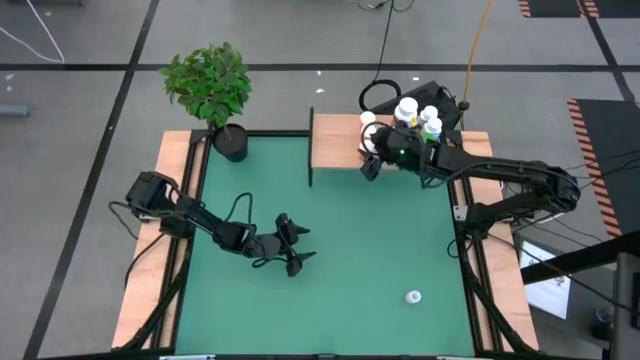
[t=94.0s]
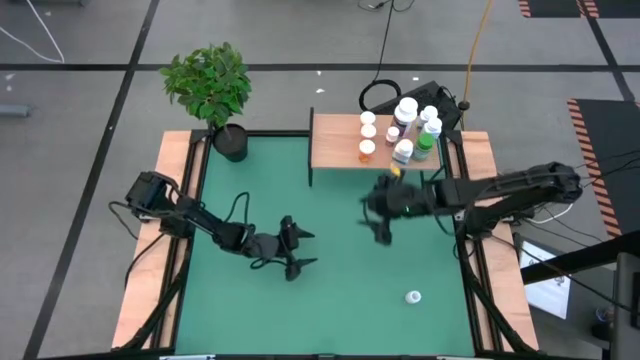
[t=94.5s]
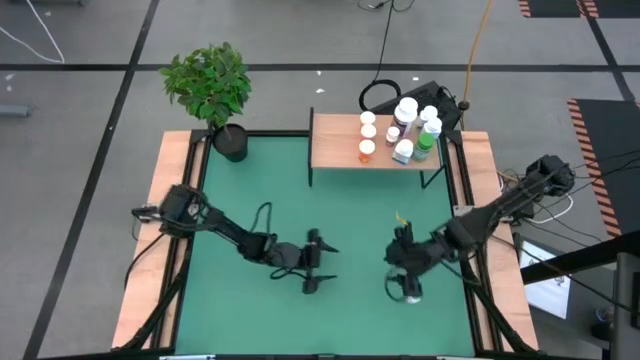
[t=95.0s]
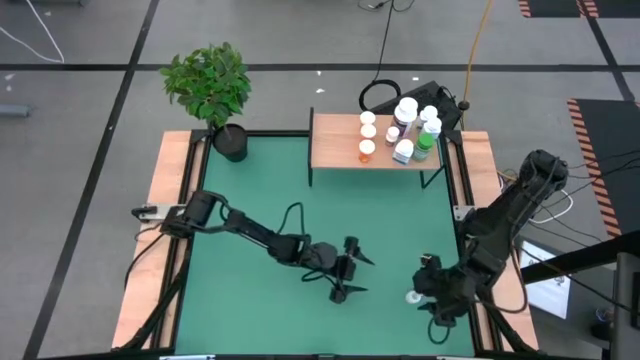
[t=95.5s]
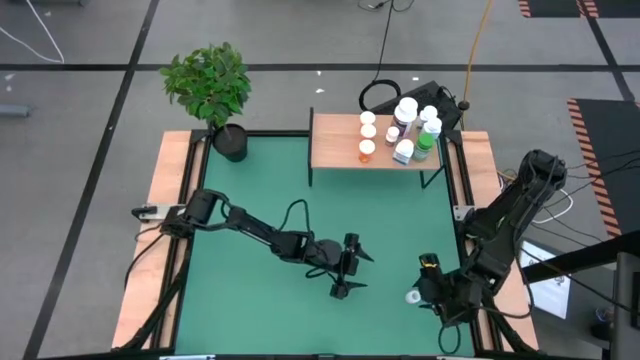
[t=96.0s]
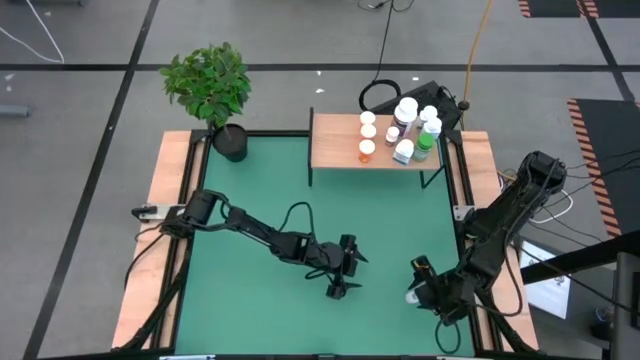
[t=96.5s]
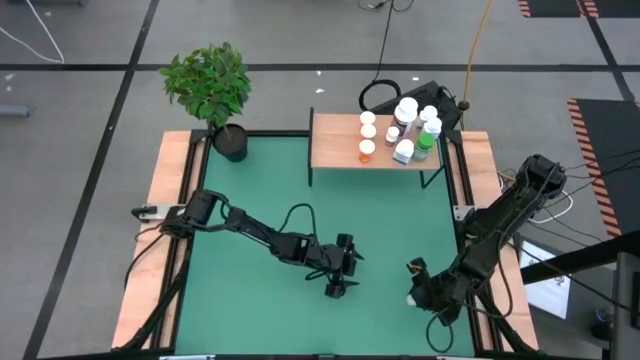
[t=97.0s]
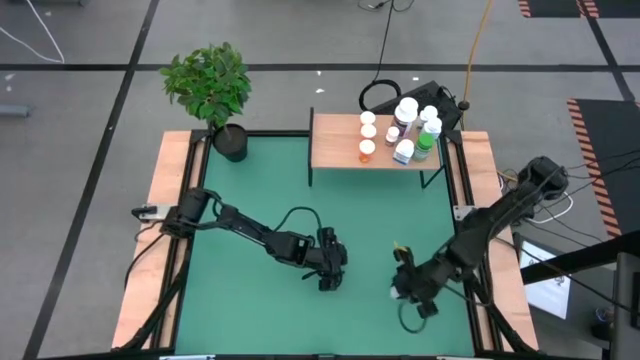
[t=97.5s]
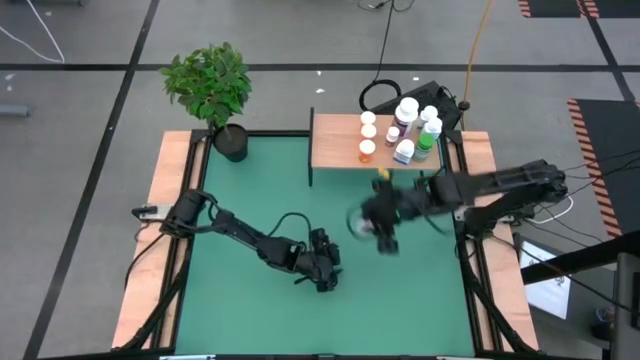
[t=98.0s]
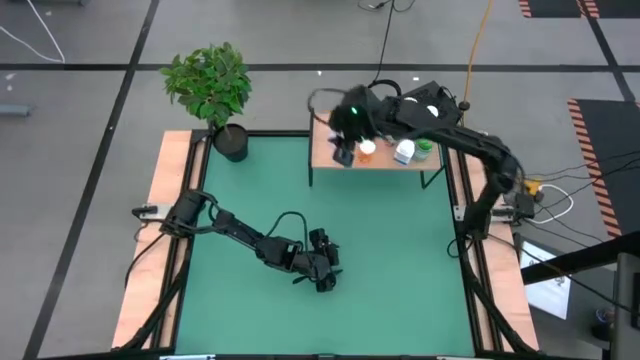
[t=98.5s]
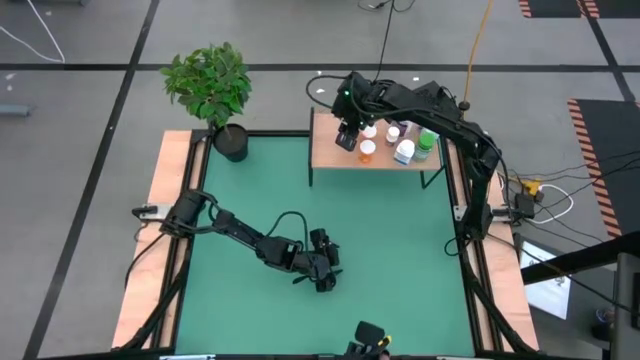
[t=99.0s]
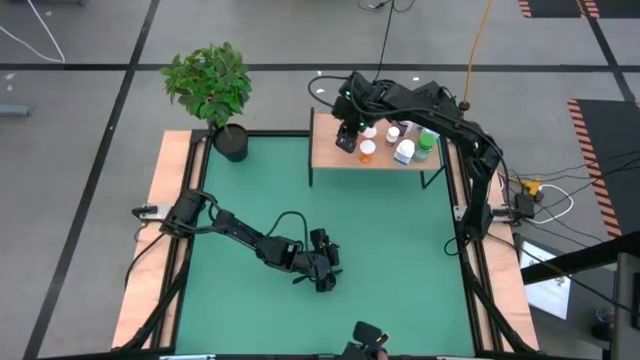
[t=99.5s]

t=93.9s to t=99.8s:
Task: Pick and place medicine bottles onto shelf by color
Put the white pill bottle on the shelf

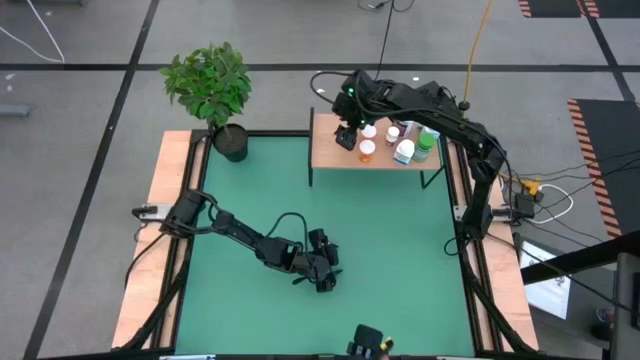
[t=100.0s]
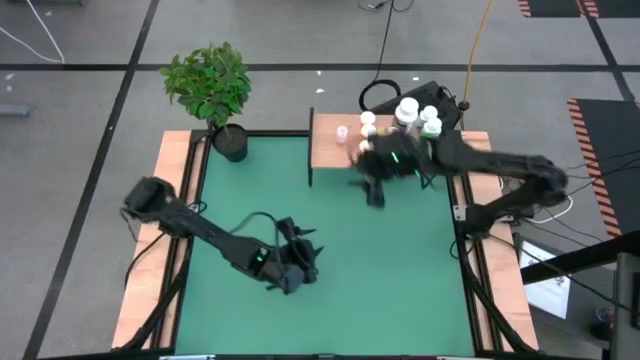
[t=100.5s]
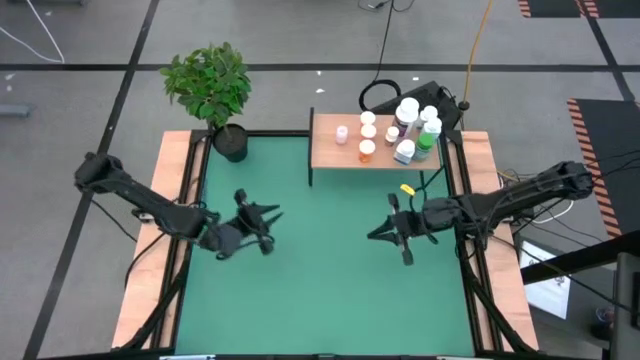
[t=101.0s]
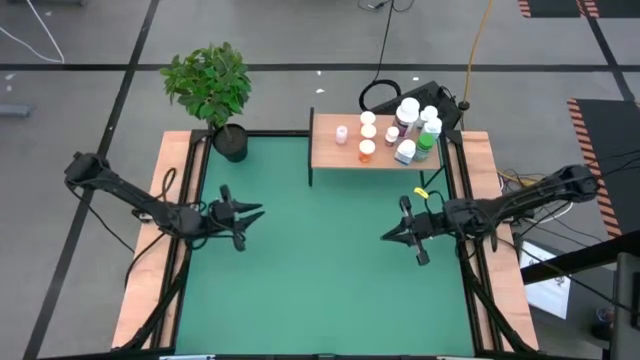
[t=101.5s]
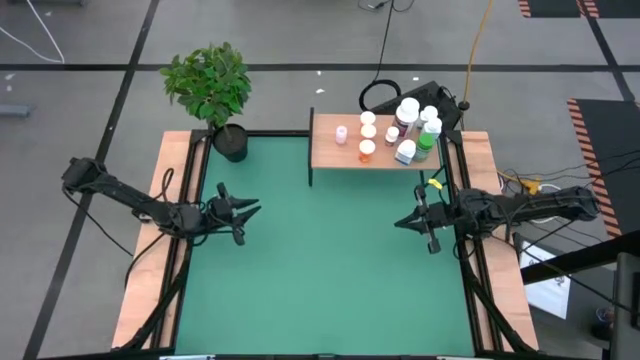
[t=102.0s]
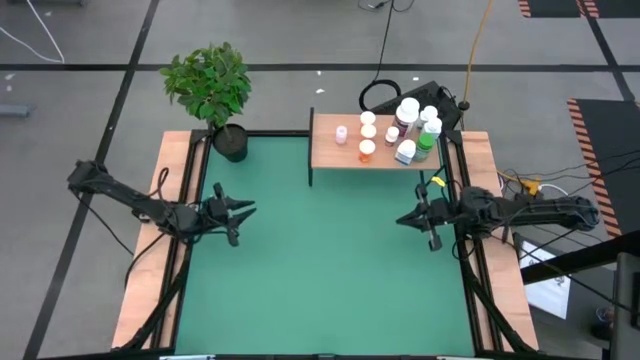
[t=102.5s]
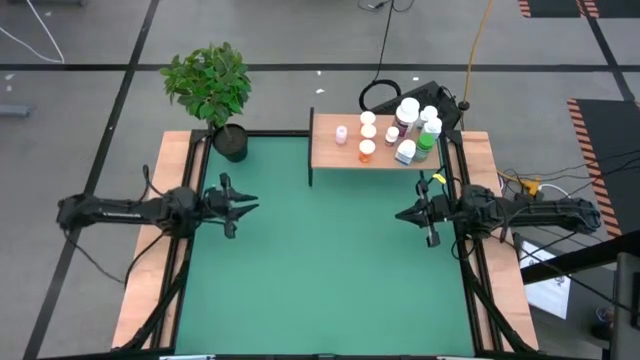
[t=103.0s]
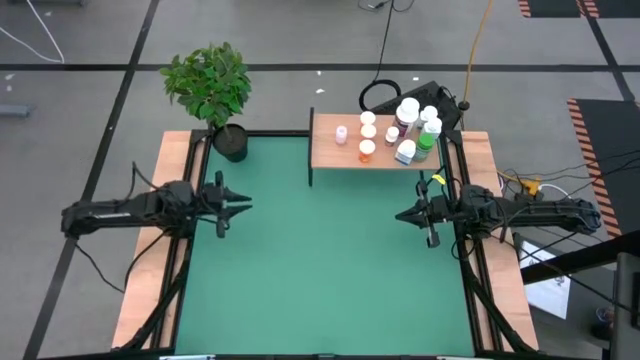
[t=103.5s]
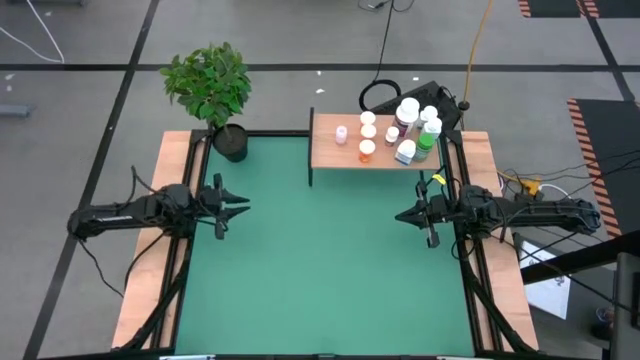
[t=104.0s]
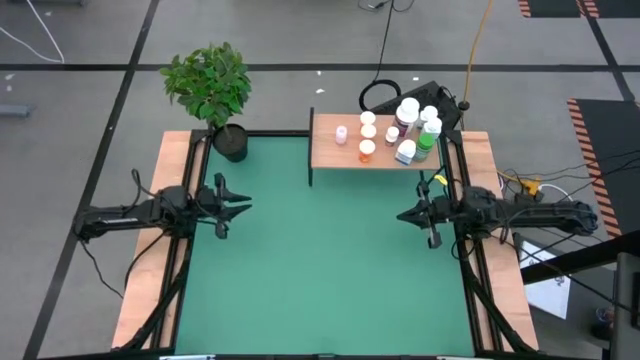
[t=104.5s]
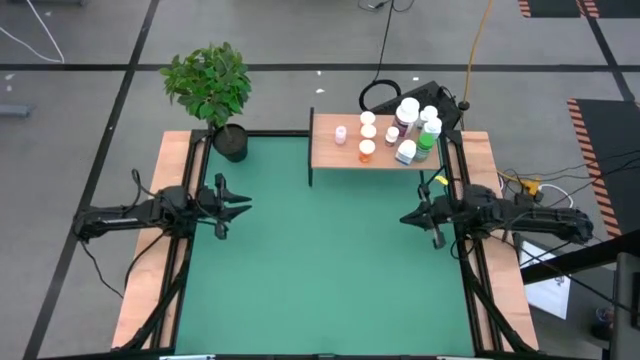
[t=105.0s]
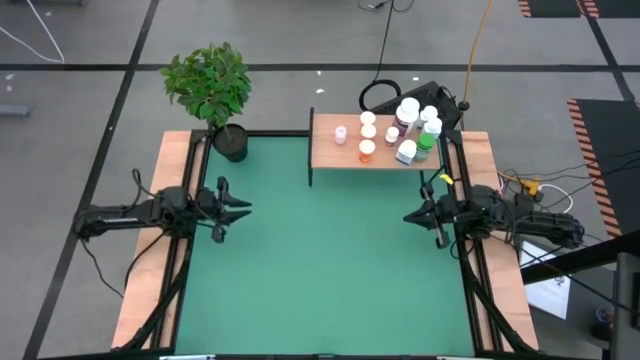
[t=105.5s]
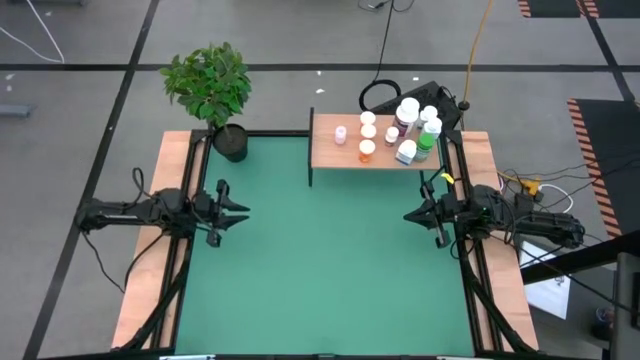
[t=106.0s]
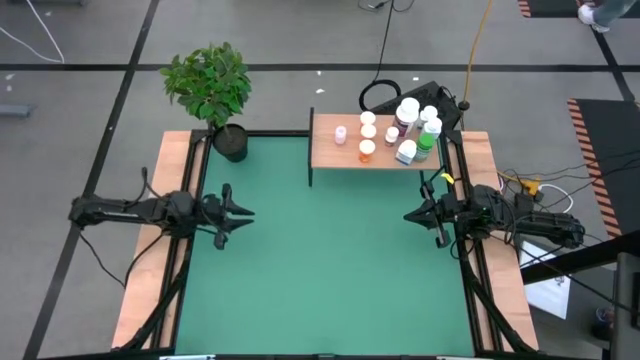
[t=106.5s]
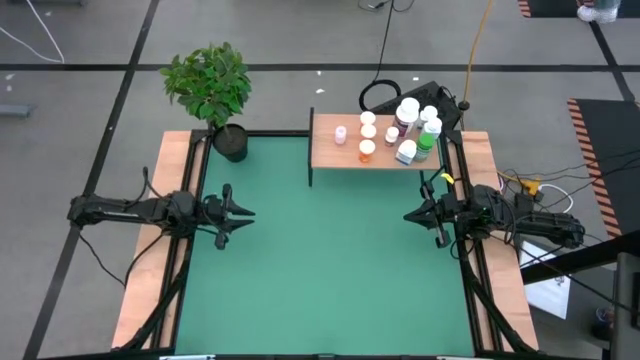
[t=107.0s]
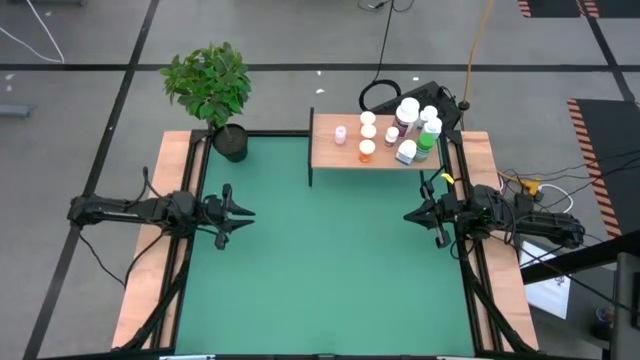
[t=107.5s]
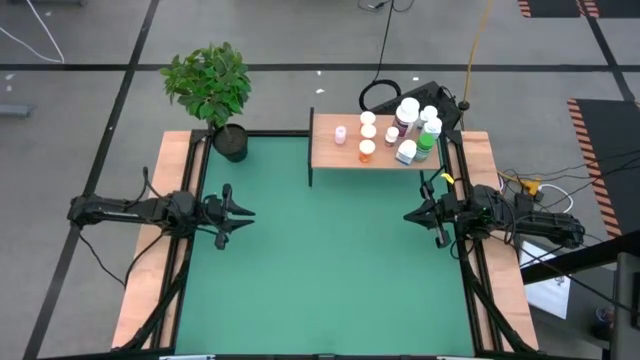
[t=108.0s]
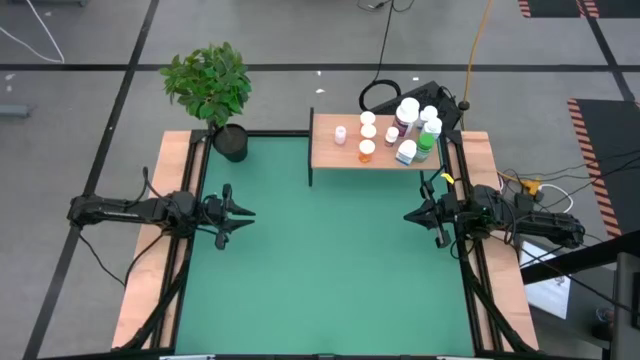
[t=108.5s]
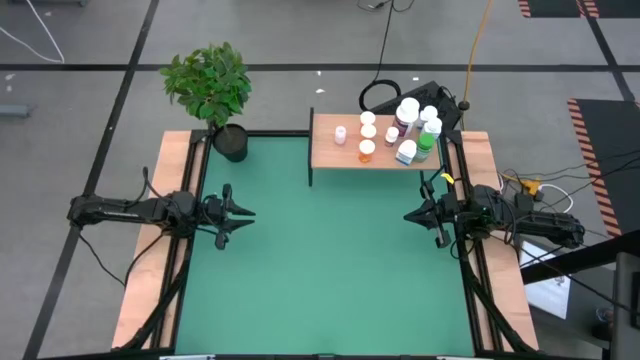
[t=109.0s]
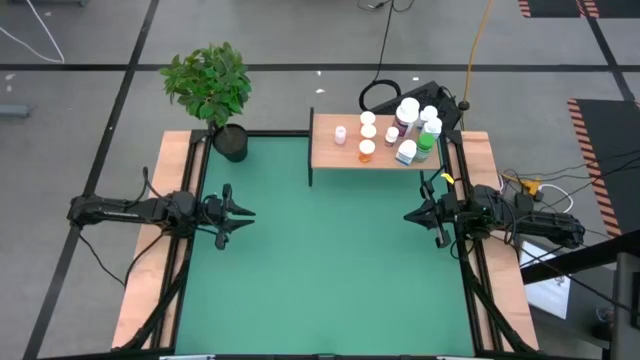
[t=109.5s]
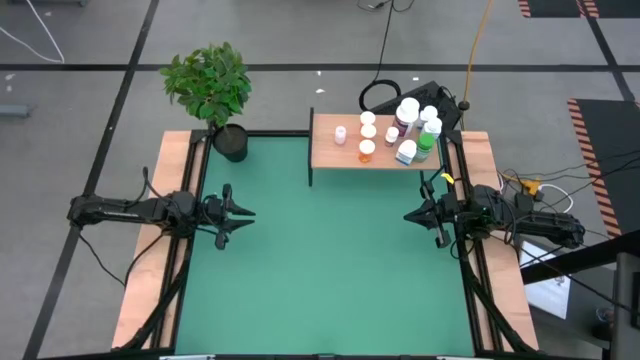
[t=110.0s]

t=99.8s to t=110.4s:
Return to Home Position

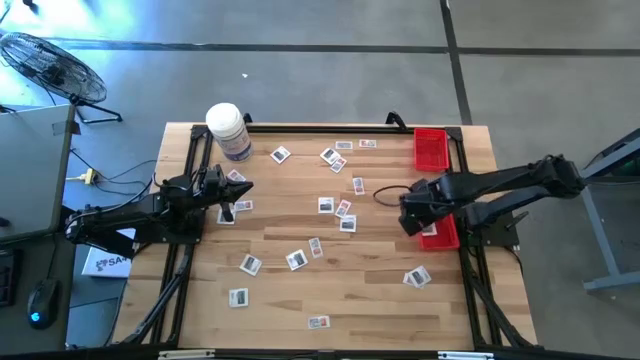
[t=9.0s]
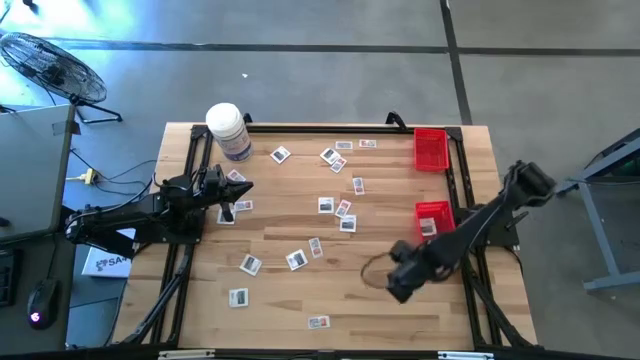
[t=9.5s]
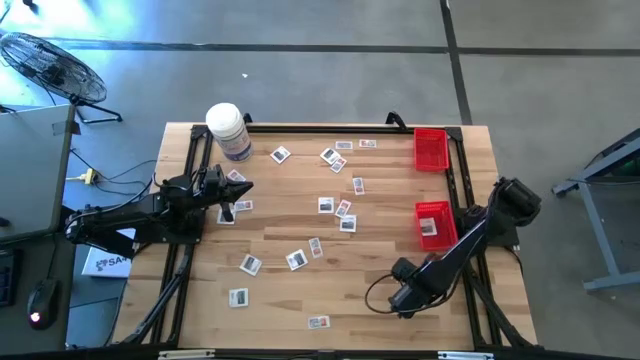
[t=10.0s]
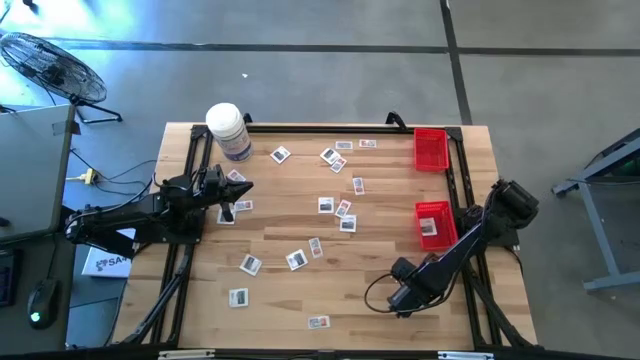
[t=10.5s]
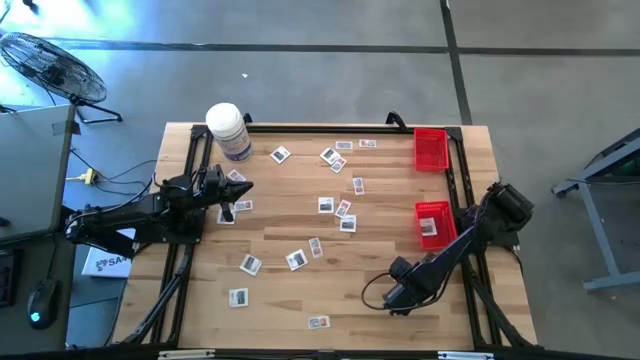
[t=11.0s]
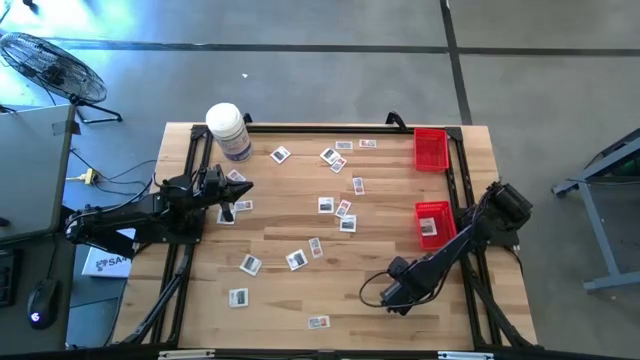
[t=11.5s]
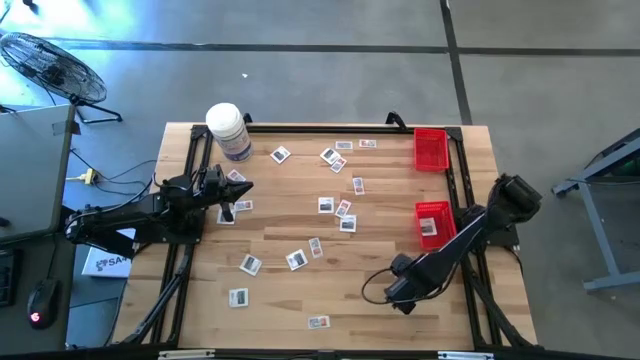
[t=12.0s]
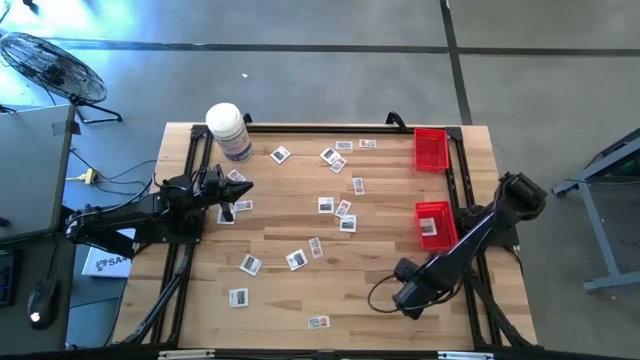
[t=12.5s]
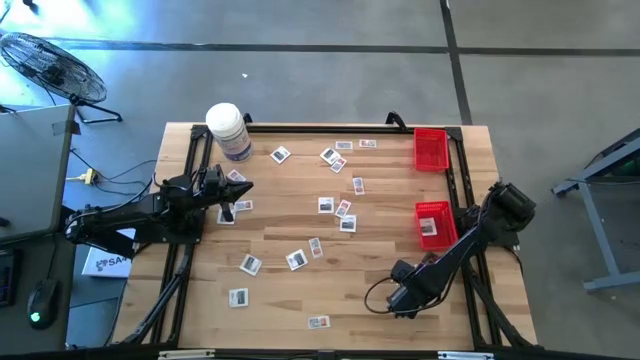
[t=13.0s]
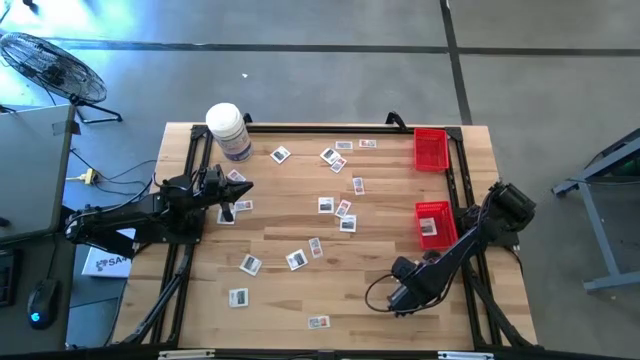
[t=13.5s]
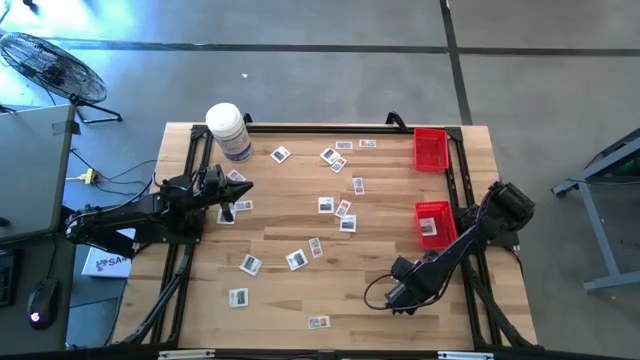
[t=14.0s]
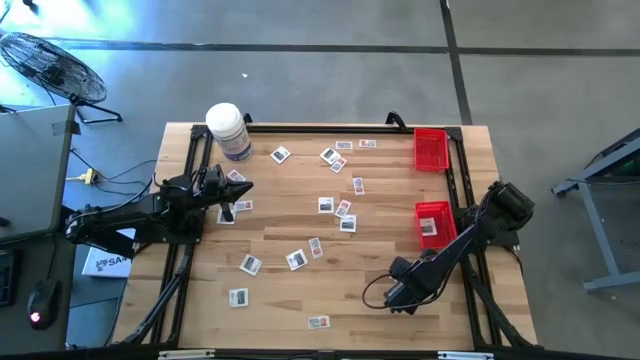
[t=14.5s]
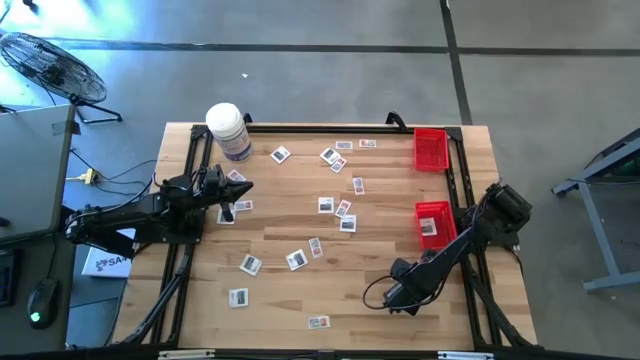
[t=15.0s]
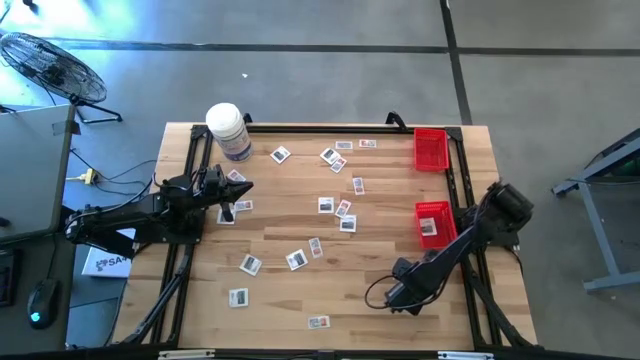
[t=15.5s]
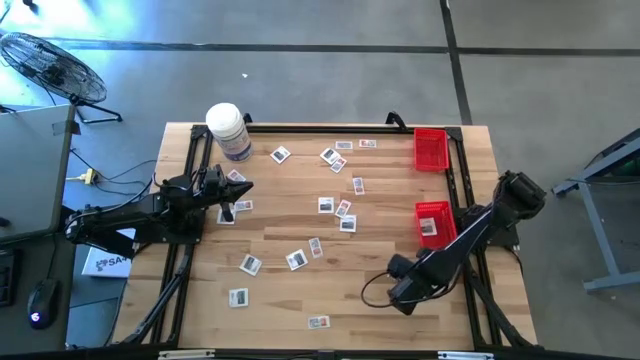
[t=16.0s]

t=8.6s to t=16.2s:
Task: Pick & Place First Aid Supplies
Put the towelette pack into the bottom basket
